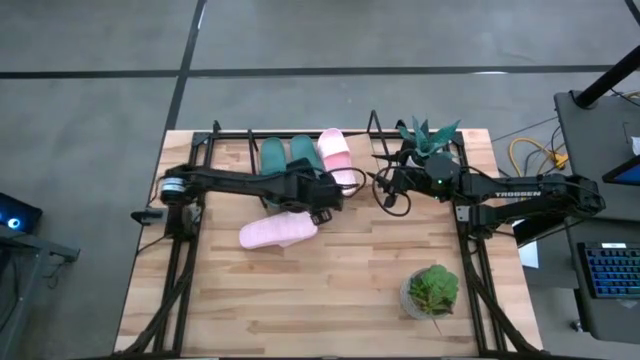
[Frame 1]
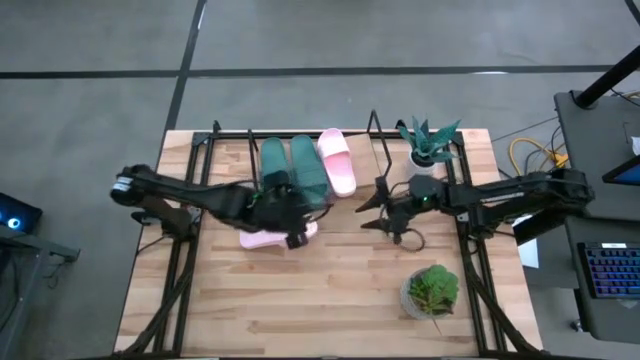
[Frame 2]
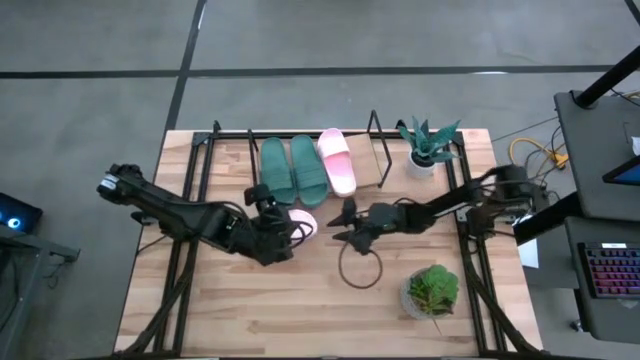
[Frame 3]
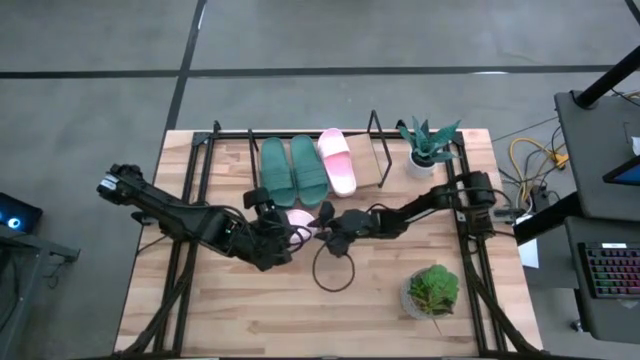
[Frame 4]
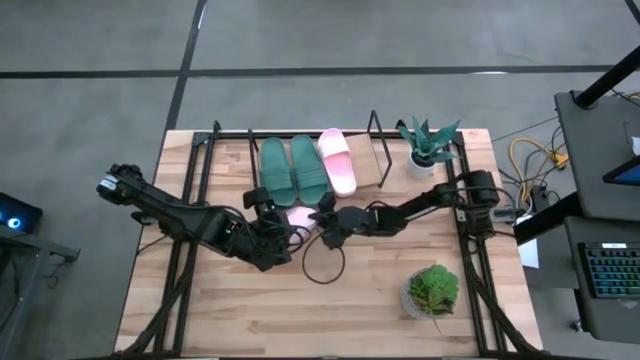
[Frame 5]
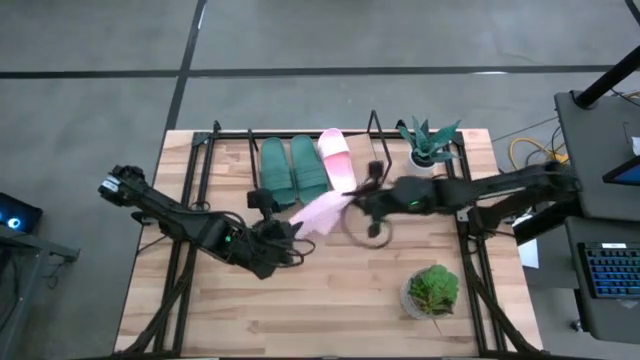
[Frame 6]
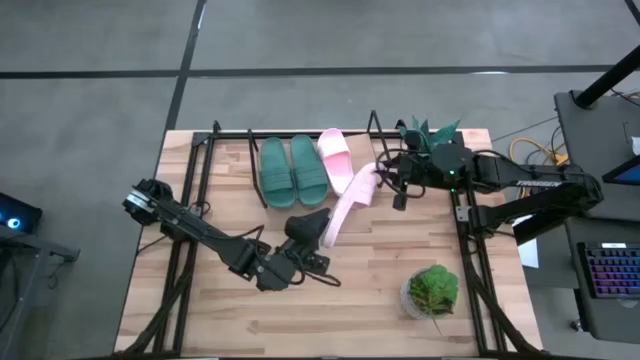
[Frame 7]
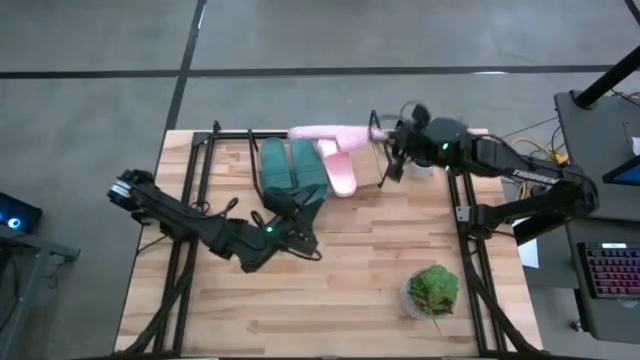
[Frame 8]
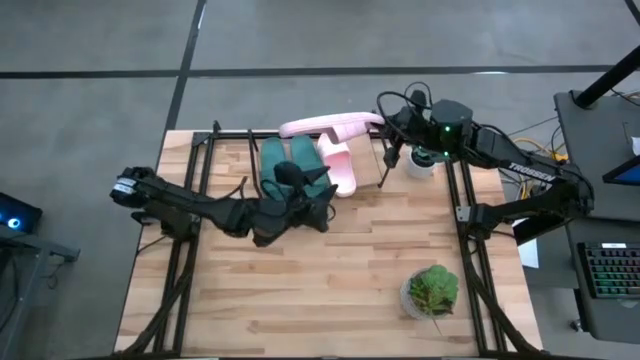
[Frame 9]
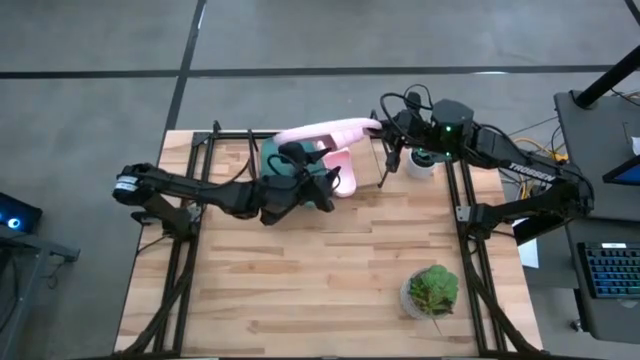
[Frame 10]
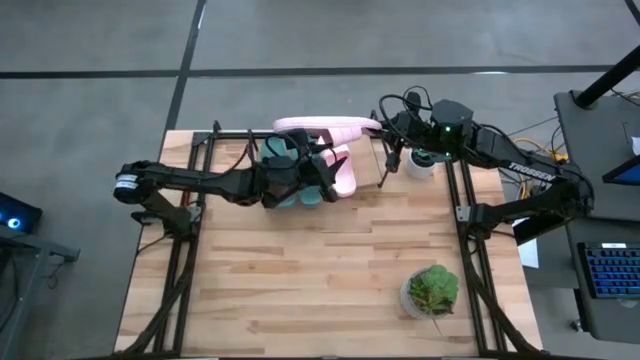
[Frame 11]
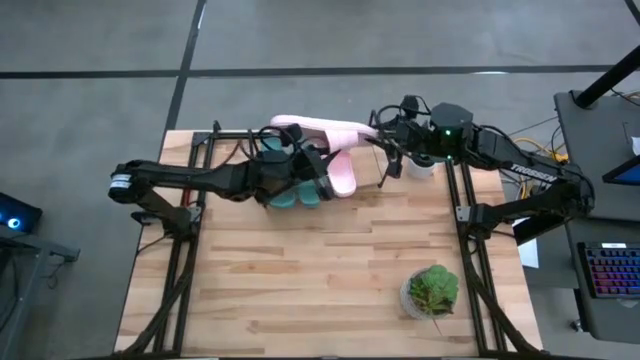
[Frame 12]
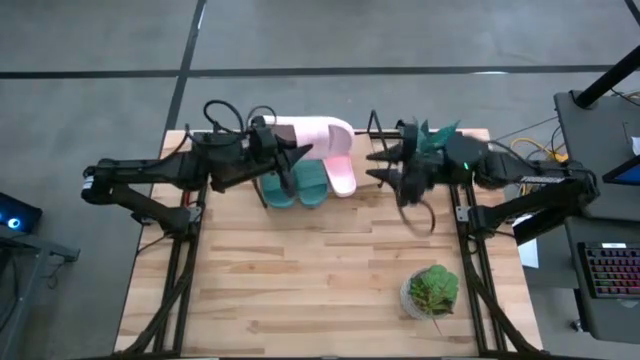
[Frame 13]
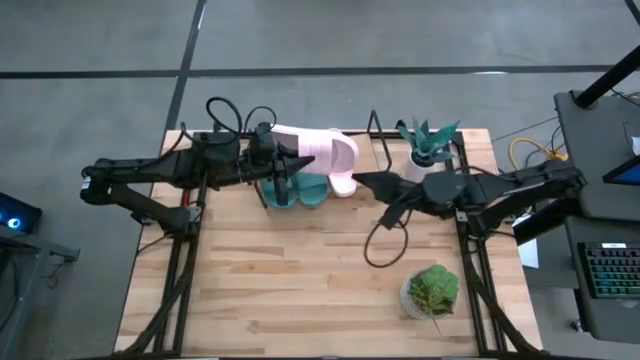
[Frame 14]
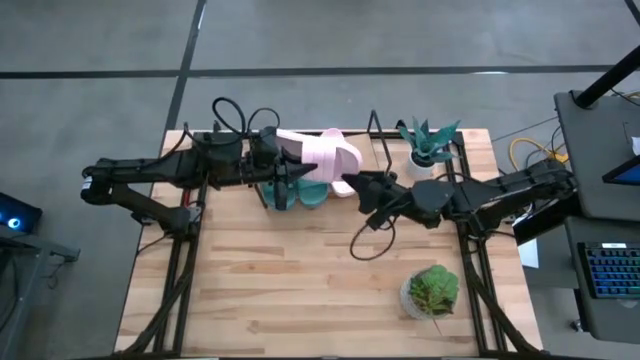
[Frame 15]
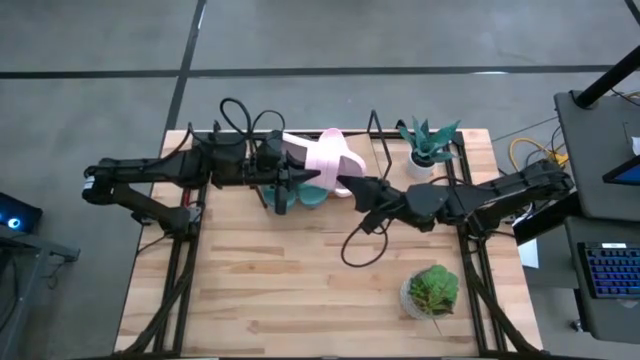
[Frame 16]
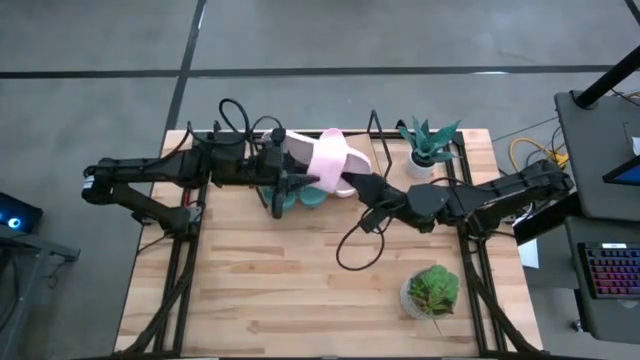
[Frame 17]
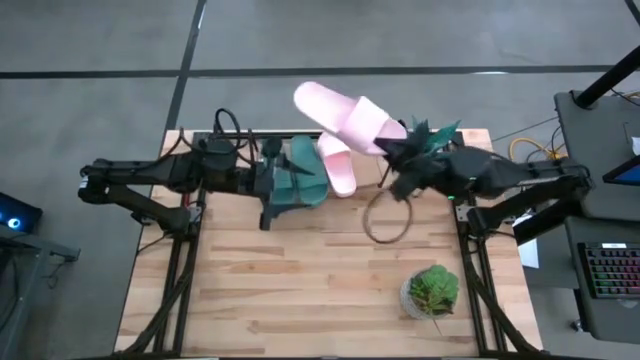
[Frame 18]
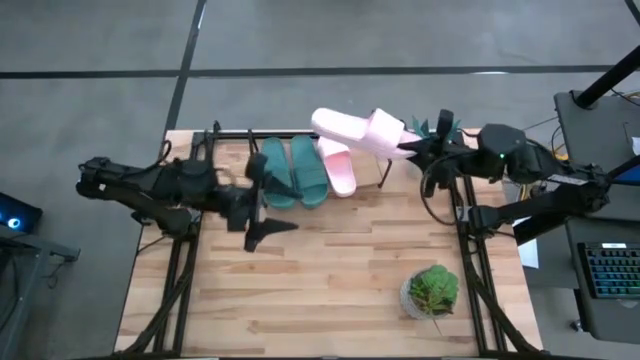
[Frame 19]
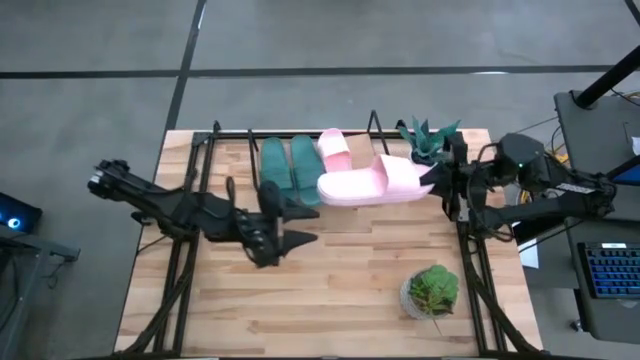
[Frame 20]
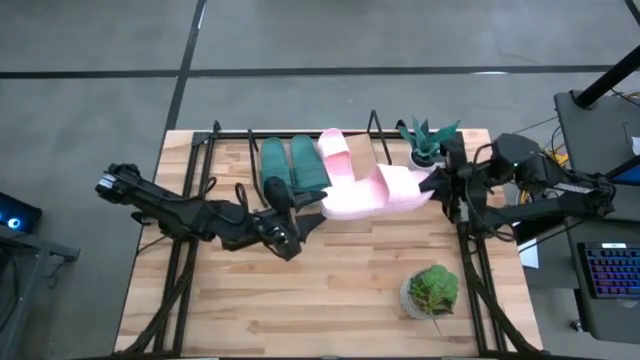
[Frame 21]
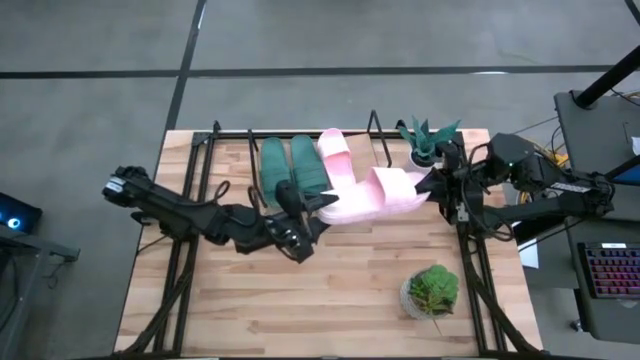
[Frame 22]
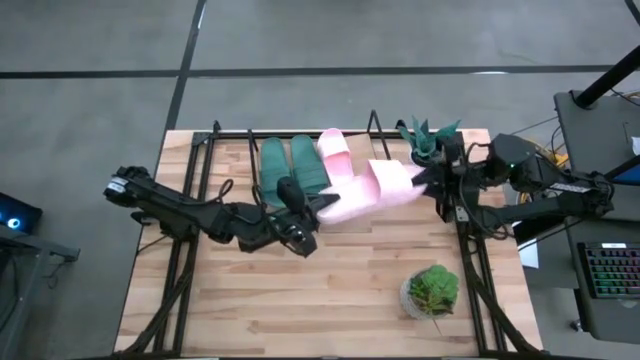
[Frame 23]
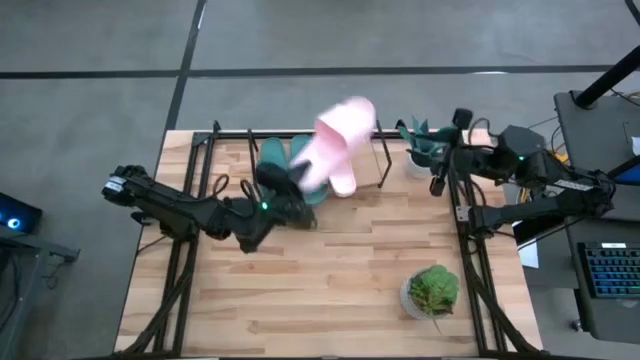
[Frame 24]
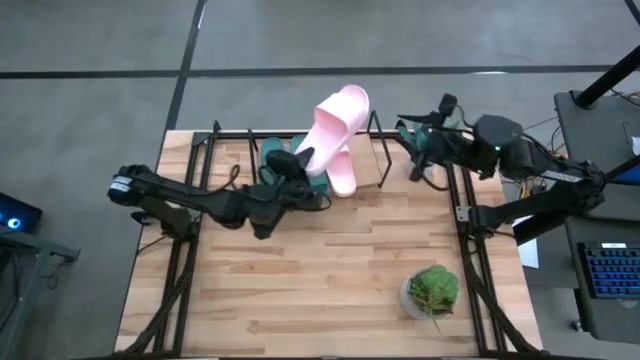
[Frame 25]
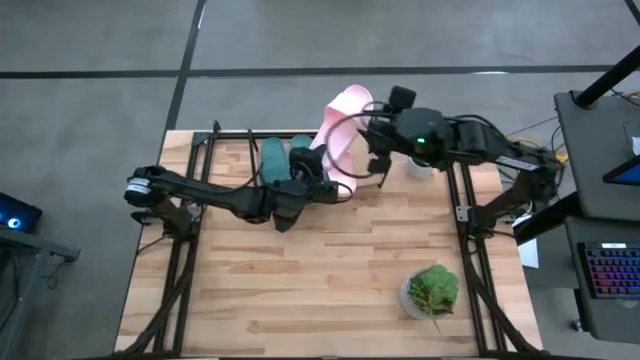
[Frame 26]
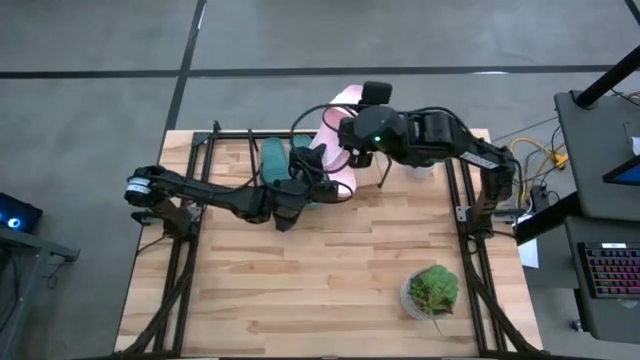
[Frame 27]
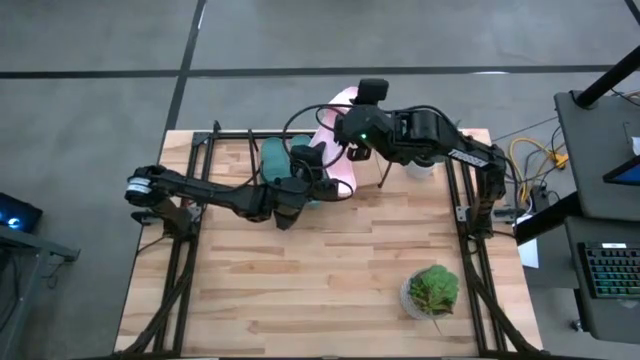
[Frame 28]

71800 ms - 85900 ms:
Task: Pick and place slides into the shelf
Put the pink slide on the shelf

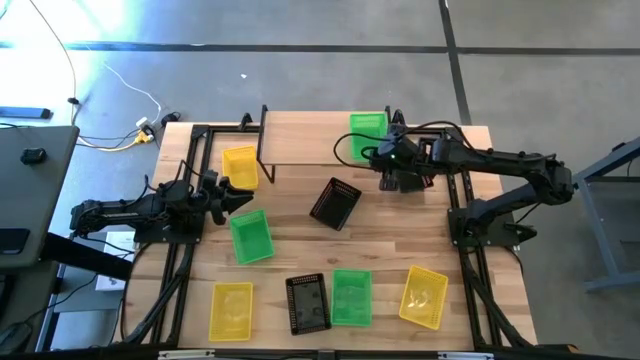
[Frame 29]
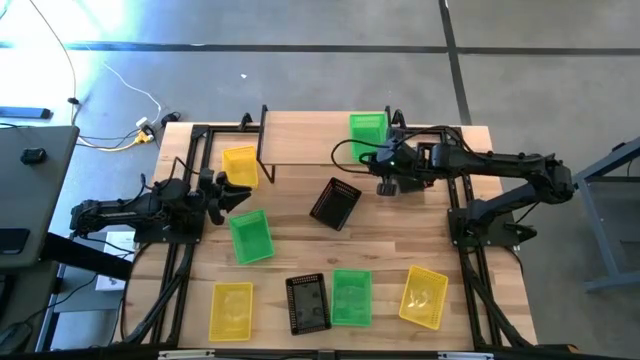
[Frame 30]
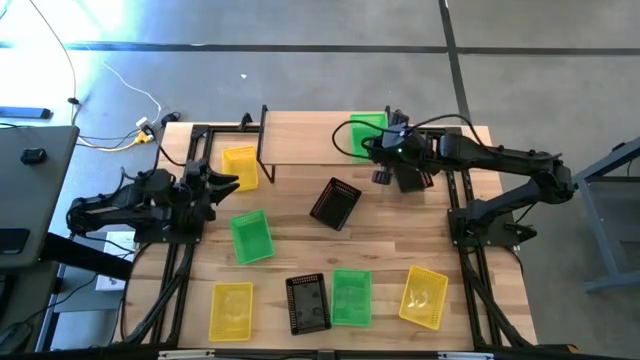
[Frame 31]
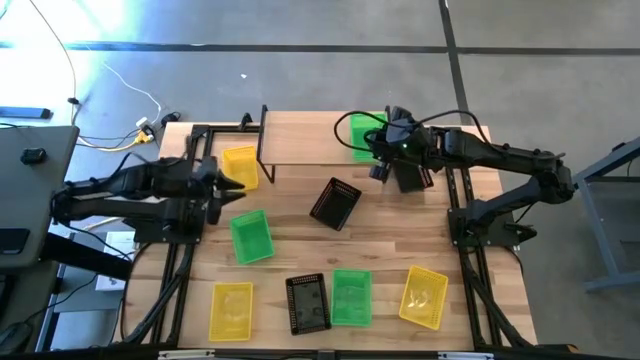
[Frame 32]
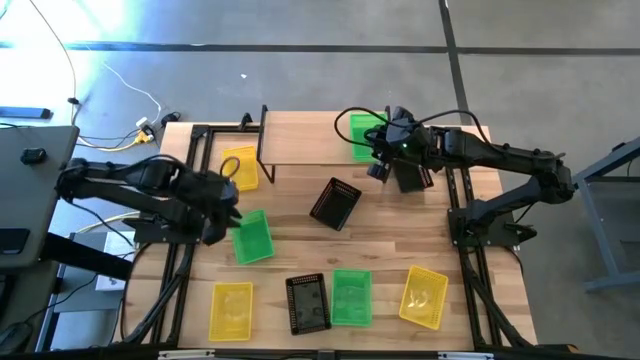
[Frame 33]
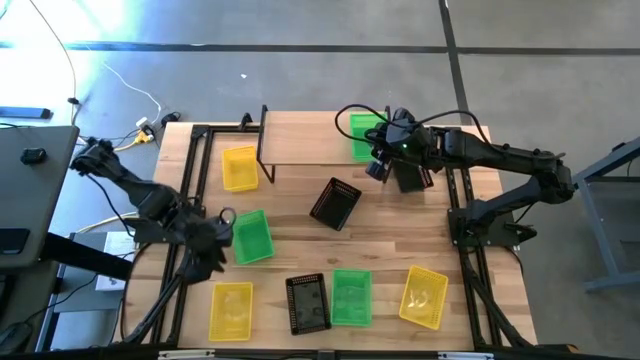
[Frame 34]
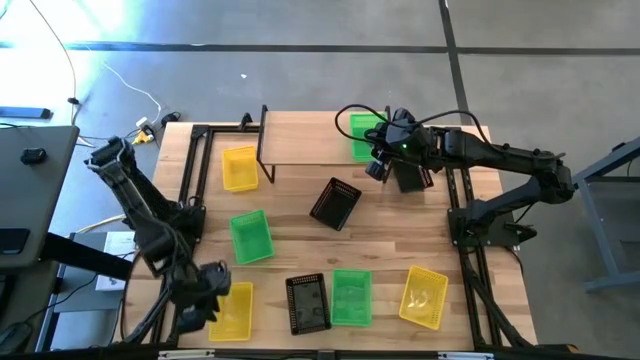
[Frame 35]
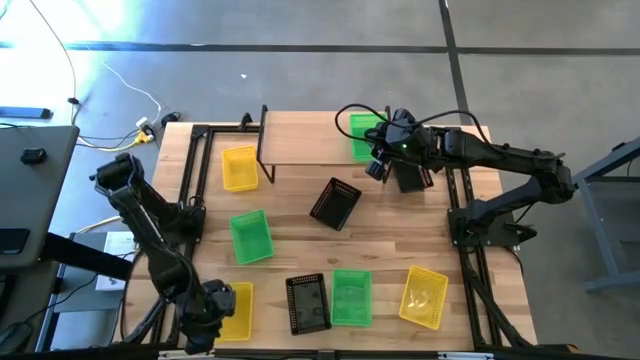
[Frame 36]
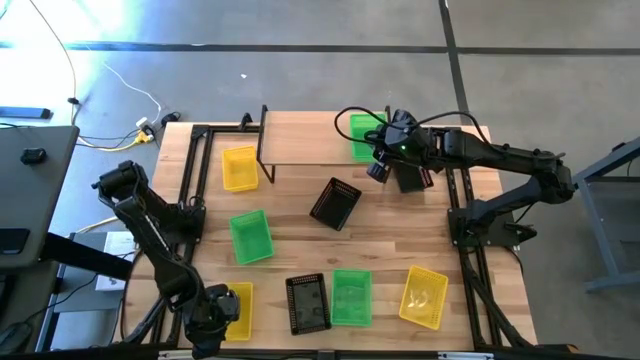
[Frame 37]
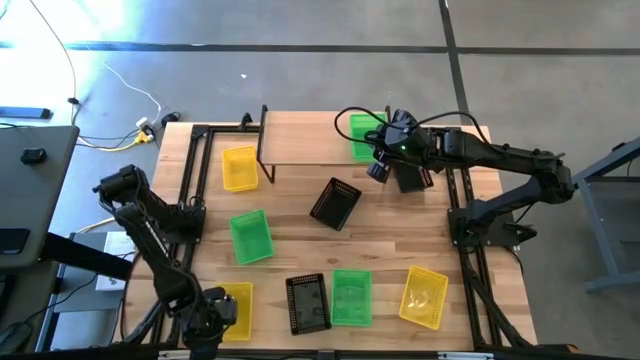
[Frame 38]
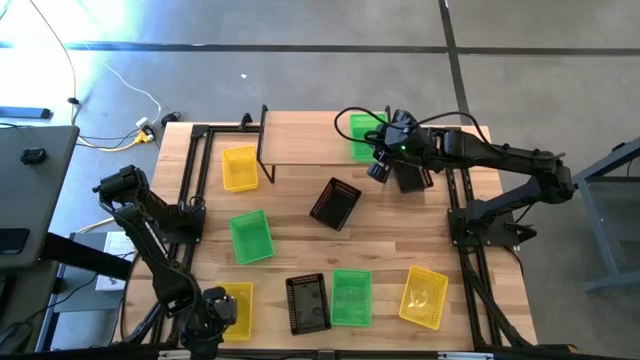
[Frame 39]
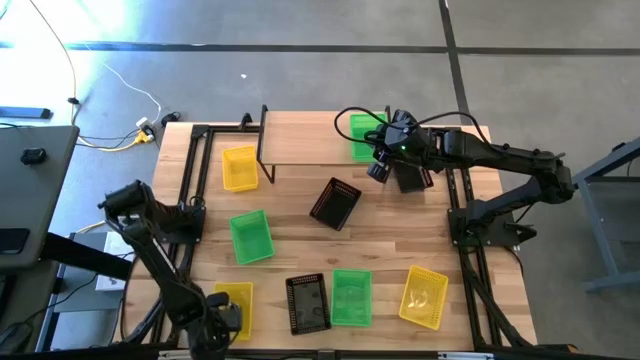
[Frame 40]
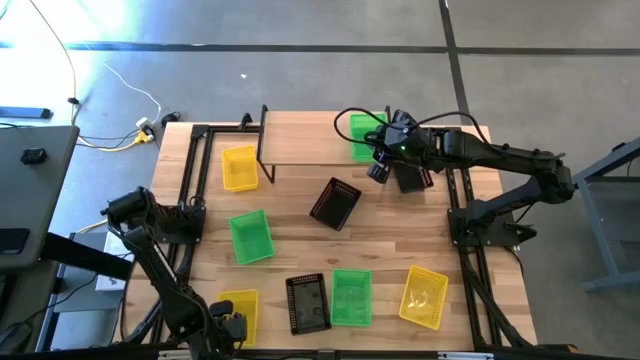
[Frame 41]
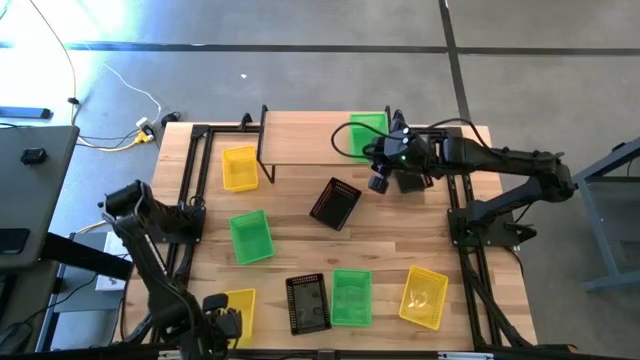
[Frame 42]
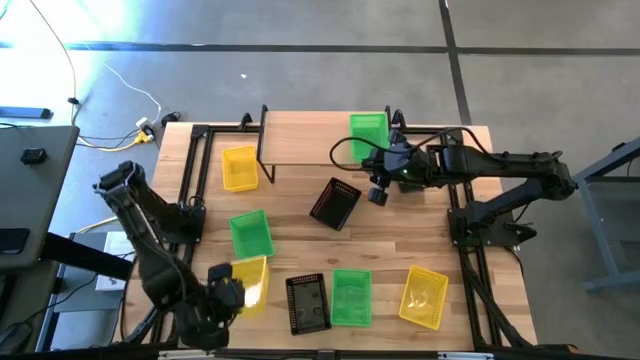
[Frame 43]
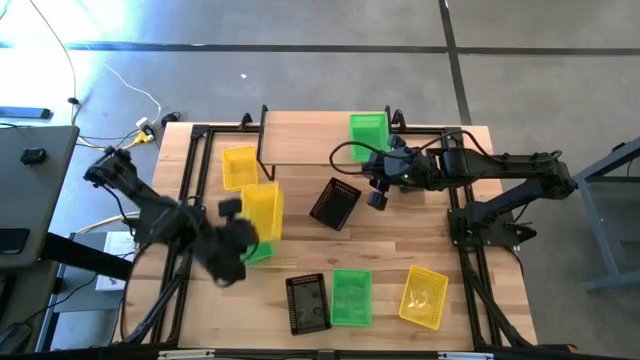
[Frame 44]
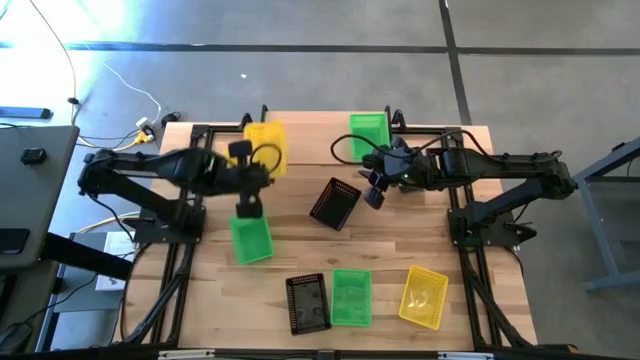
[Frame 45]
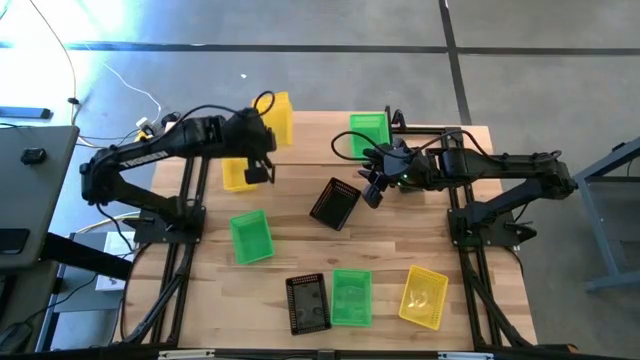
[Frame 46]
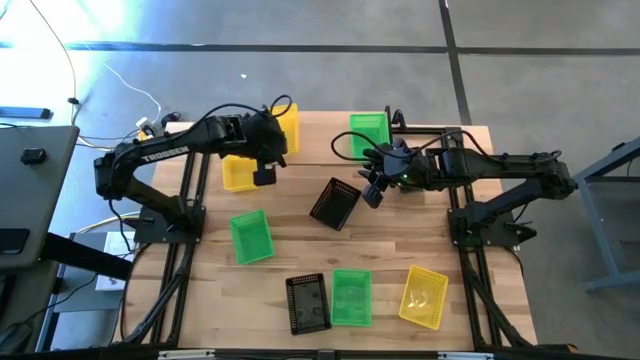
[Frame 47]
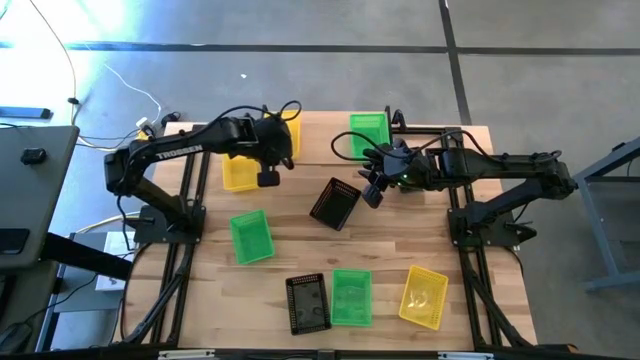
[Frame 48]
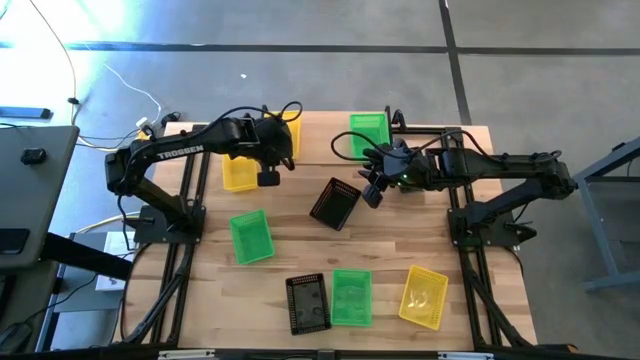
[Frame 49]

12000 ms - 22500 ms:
Task: Stack baskets on shelf by color
Put the bottom left yellow bin on the shelf
